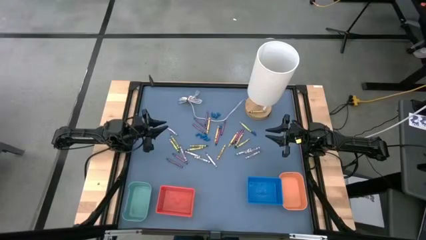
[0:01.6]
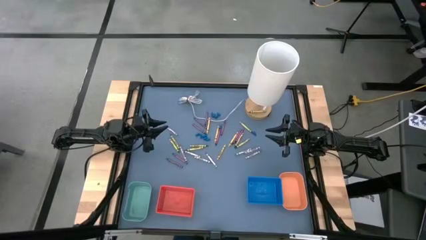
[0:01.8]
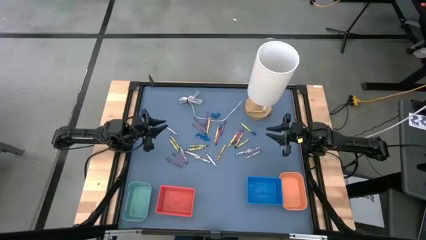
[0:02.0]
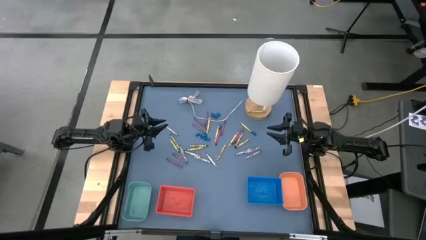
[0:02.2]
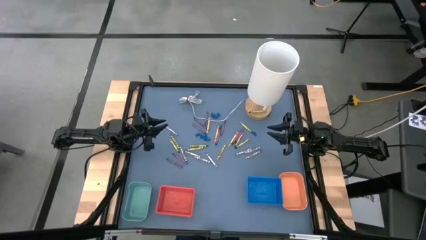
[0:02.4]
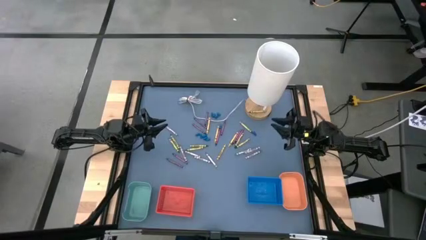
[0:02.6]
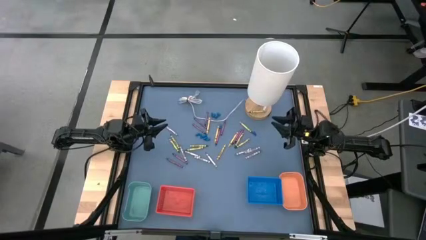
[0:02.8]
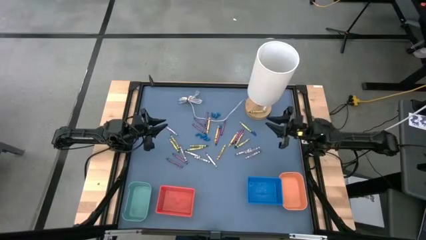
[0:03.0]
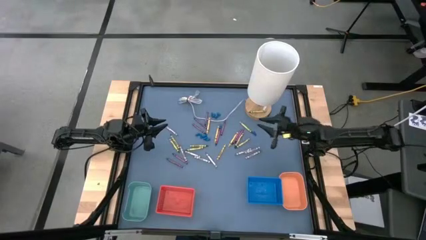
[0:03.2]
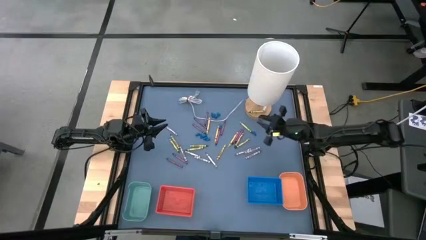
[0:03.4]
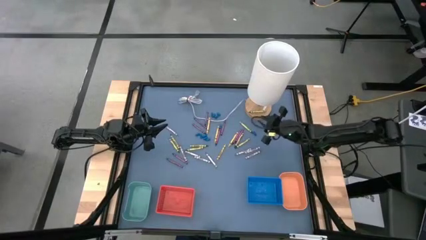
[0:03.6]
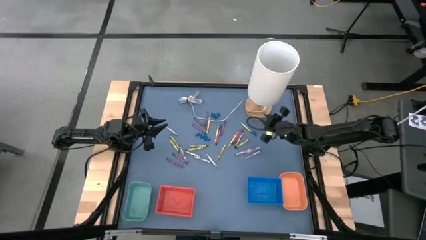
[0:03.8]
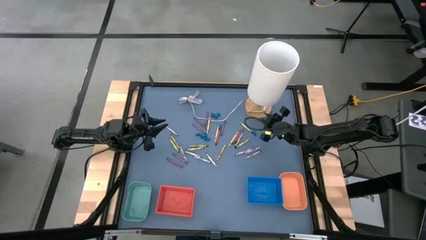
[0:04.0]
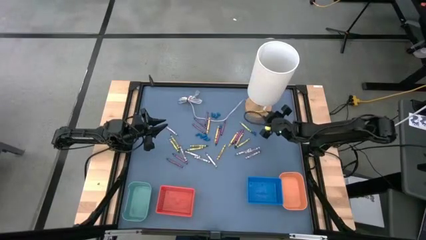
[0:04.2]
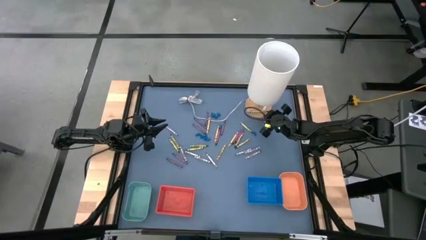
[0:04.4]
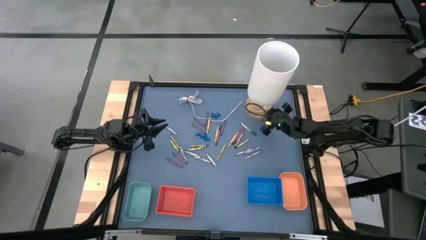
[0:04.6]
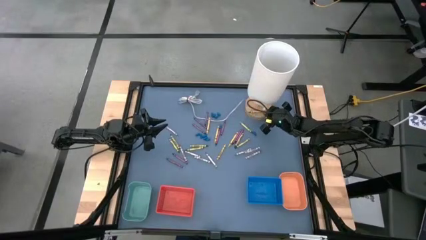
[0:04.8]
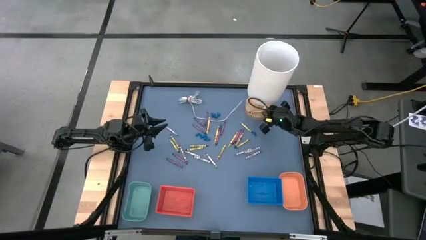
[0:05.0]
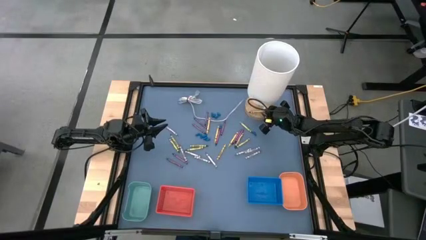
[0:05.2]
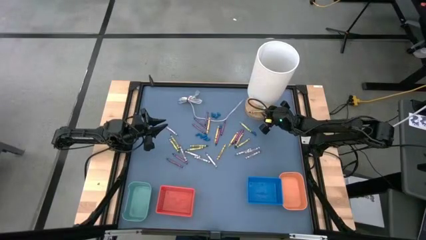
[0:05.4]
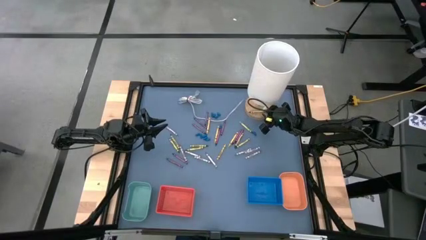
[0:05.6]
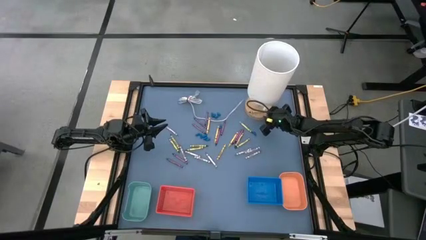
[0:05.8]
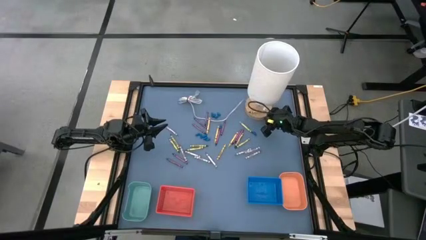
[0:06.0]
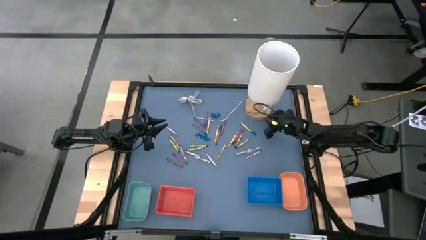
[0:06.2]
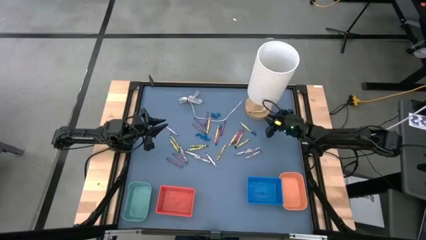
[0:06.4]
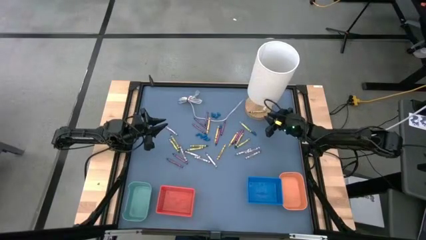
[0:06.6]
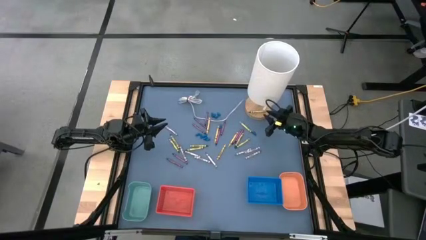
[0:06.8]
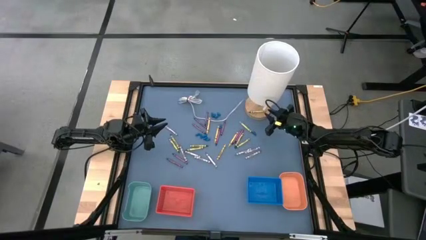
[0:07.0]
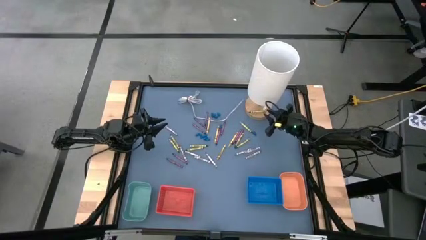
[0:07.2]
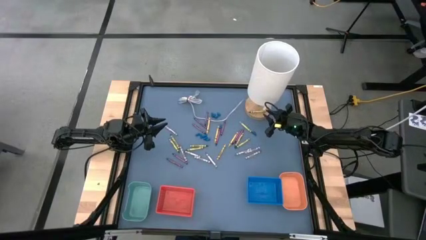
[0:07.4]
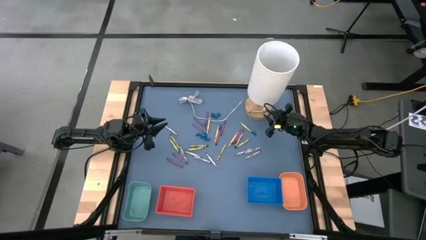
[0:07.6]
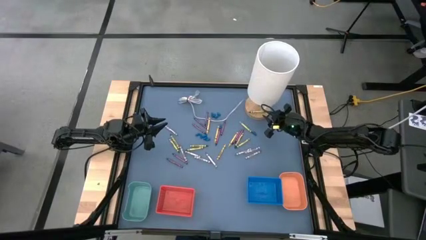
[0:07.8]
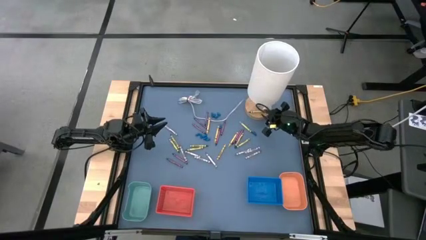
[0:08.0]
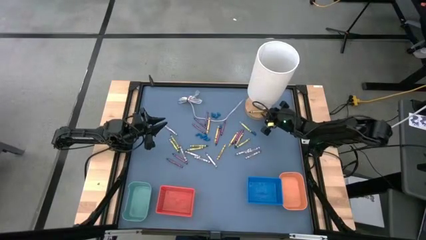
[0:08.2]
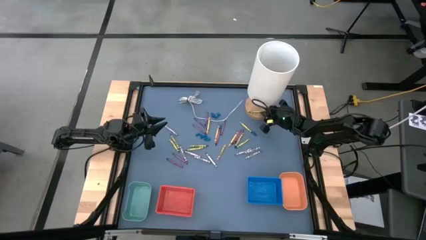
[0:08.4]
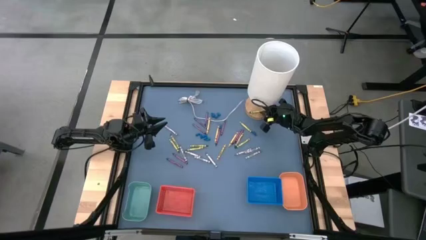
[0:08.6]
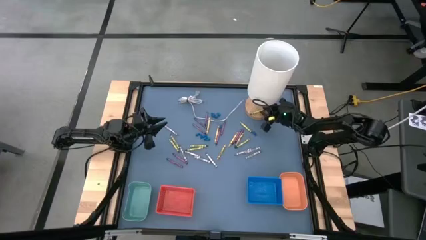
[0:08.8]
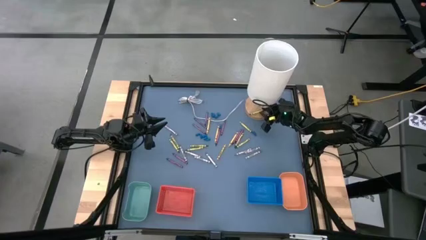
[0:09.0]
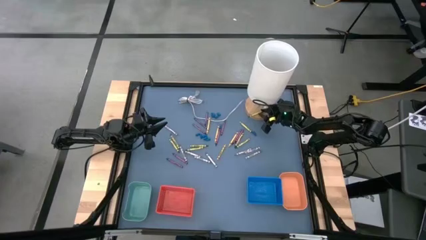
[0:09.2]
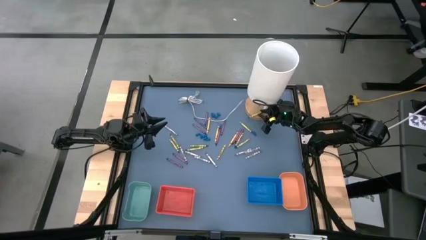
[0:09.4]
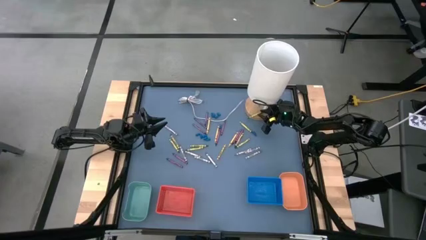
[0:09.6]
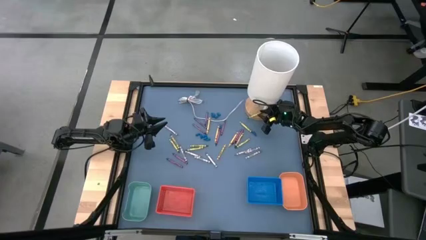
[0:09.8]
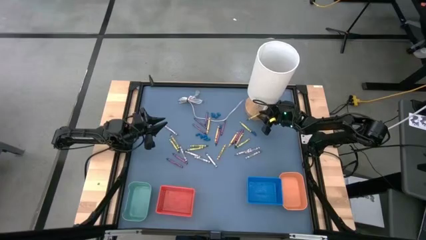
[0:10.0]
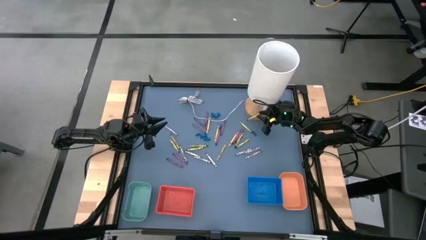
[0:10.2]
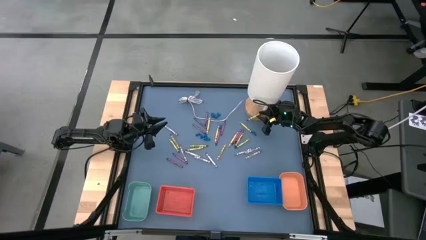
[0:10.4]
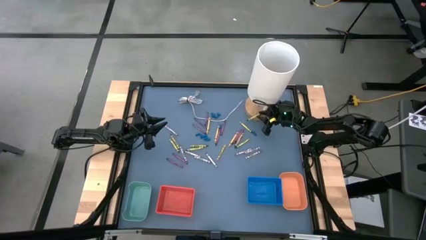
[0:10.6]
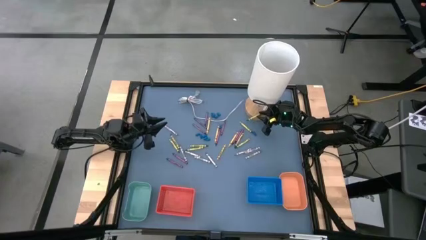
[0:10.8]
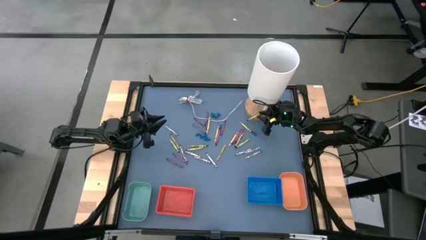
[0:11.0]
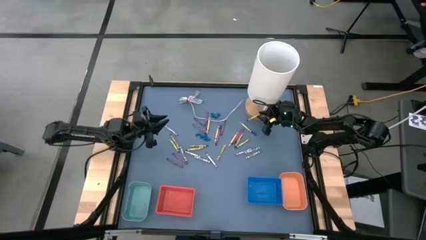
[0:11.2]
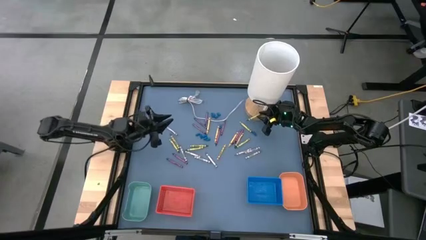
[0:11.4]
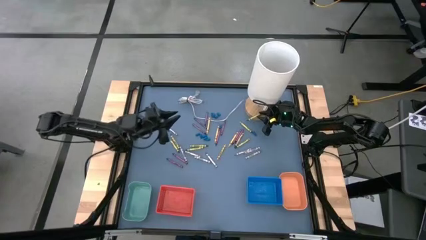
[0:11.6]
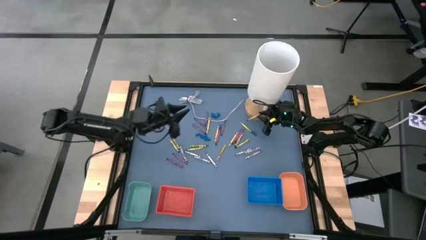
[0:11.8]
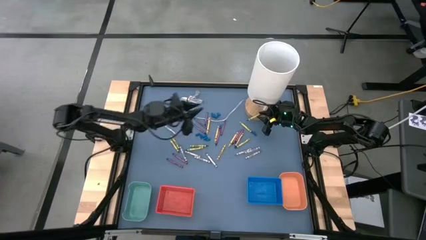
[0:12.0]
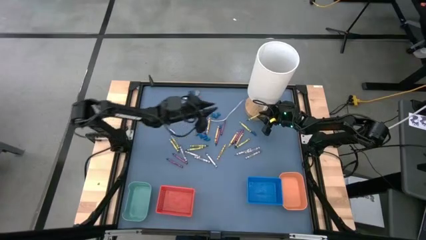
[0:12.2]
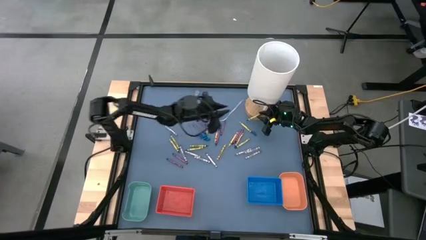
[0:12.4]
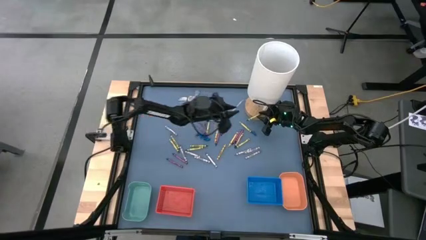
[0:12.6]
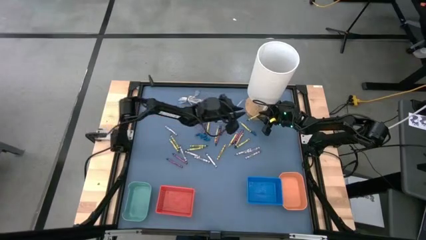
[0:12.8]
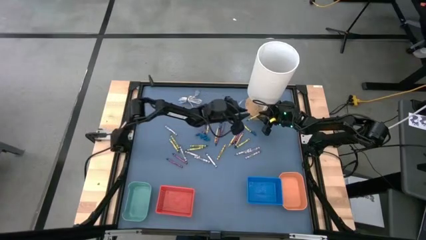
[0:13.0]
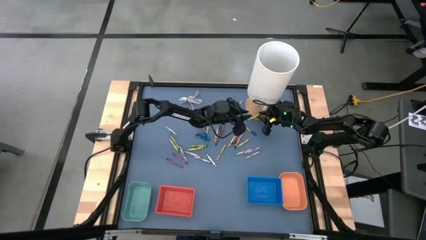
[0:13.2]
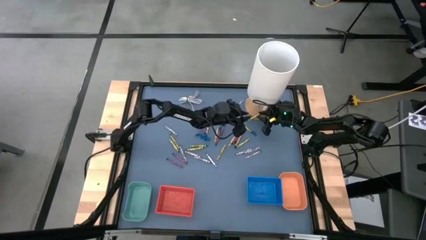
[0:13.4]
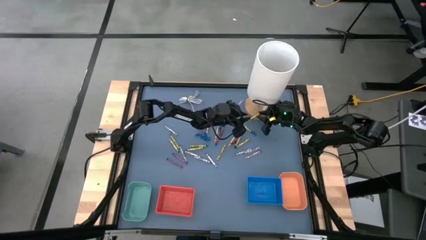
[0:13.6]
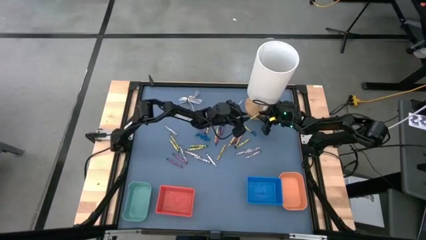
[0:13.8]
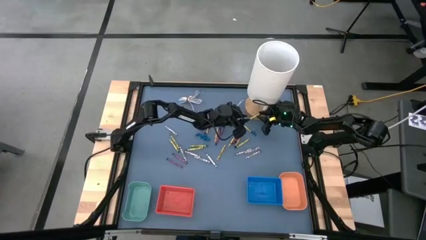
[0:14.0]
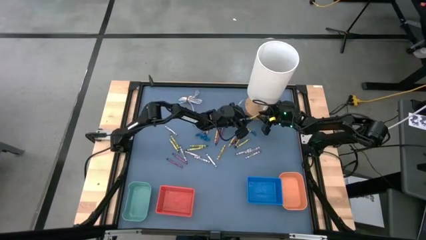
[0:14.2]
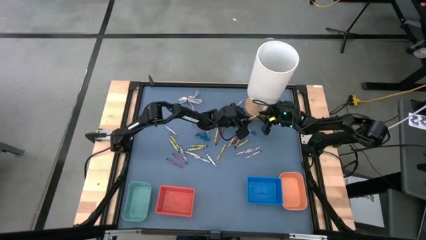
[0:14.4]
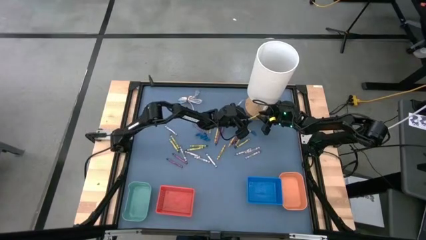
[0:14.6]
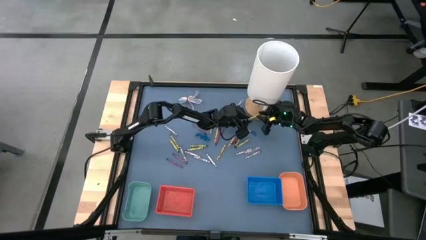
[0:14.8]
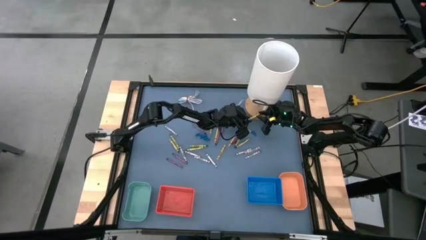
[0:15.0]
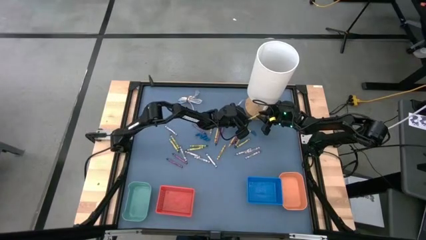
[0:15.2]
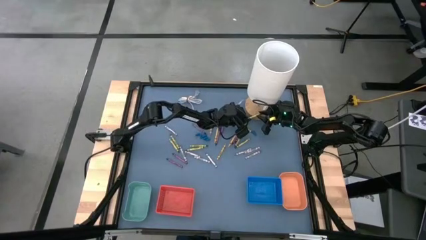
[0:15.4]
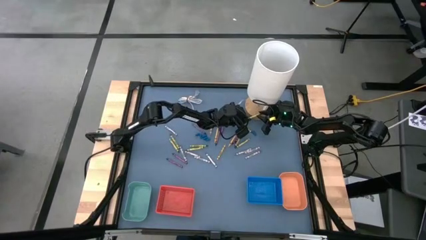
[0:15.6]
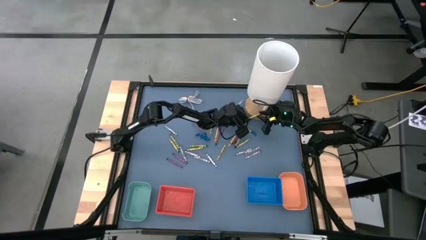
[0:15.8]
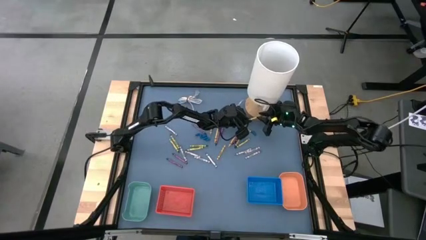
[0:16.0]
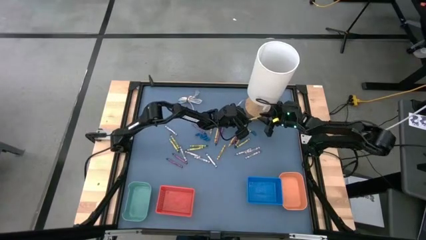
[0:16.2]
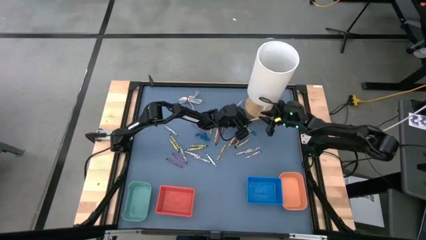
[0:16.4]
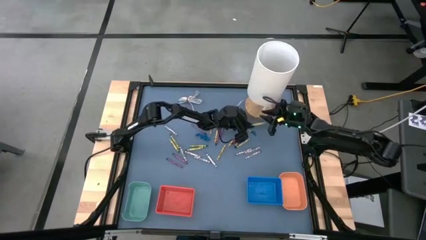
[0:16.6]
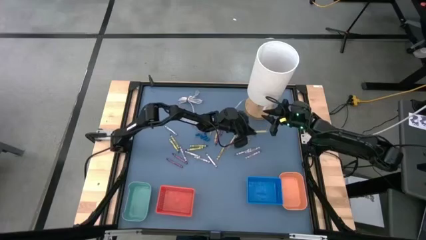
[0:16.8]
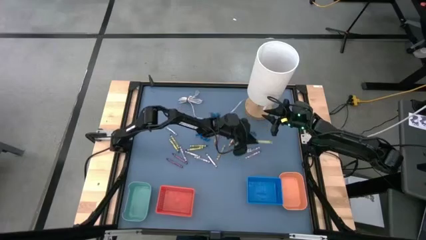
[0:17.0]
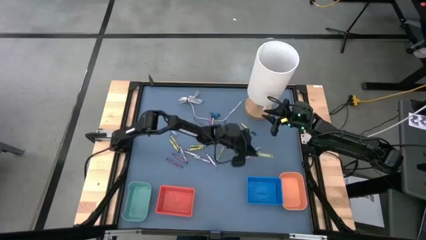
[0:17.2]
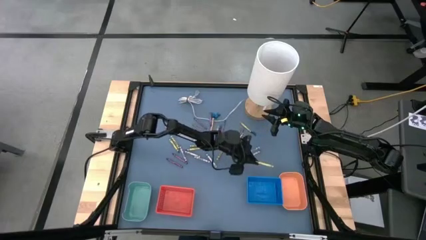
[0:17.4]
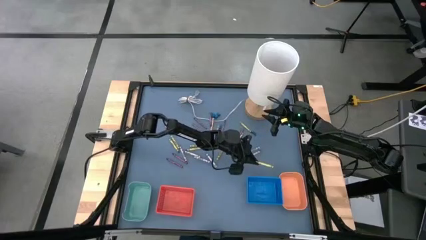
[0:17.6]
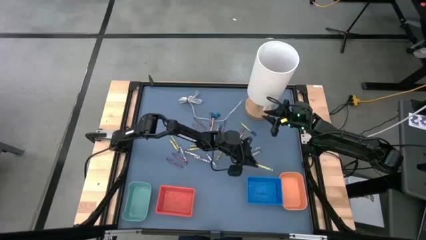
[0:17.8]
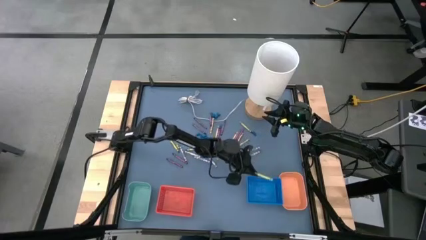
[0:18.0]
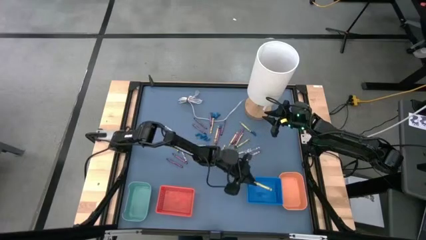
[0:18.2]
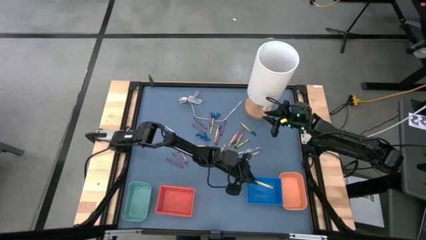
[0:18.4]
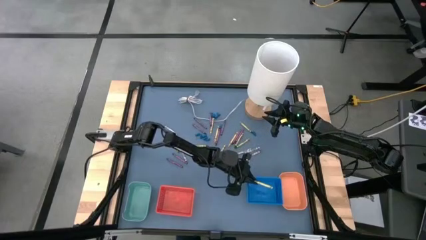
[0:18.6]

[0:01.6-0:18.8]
Task: Sort crayons
Put the green crayon into the blue basket
